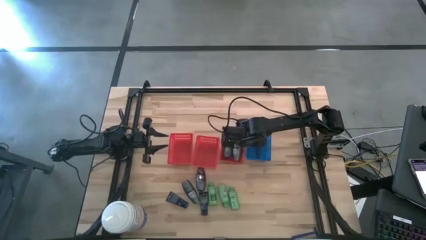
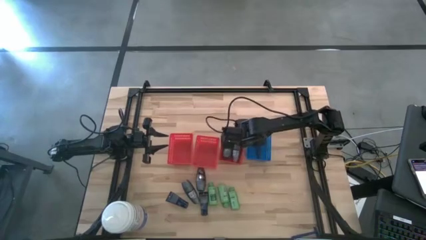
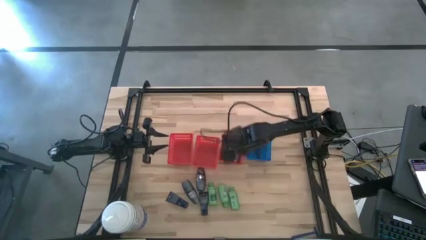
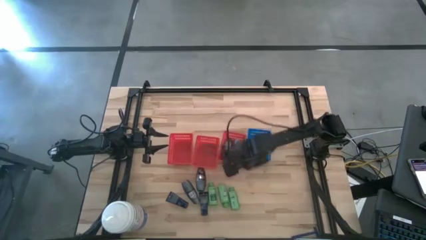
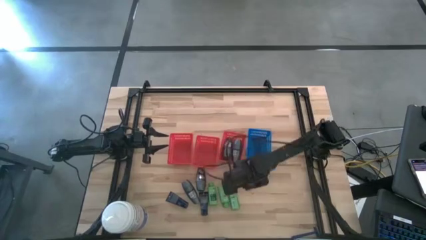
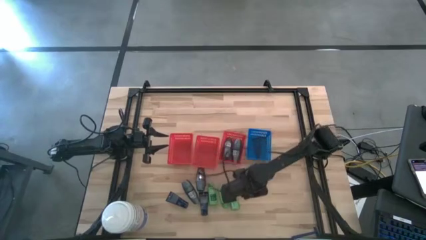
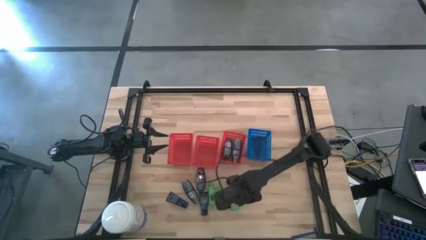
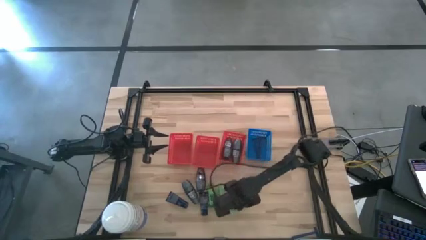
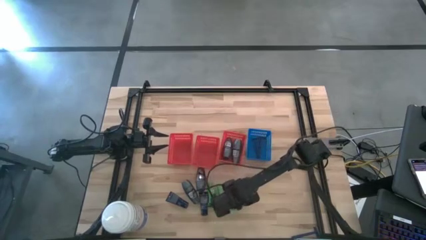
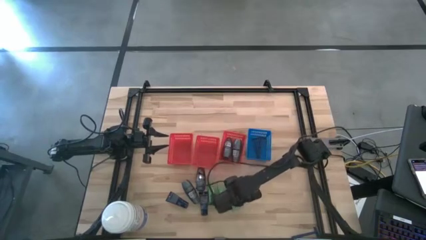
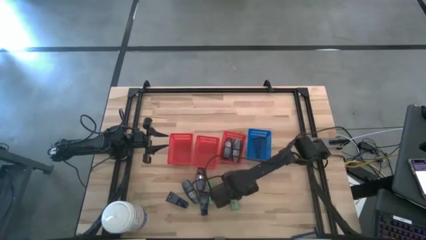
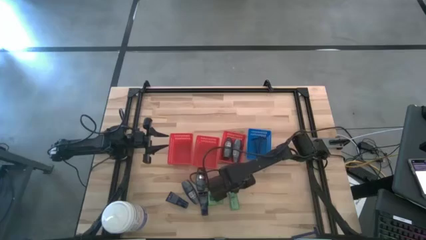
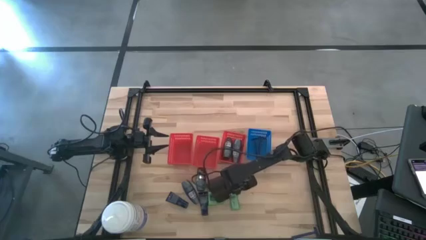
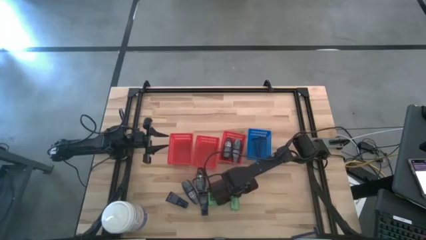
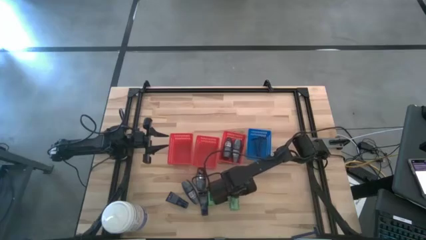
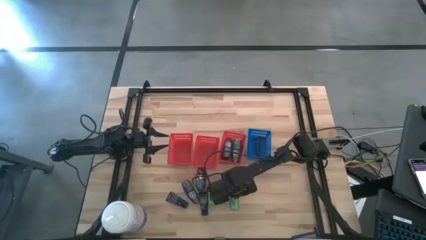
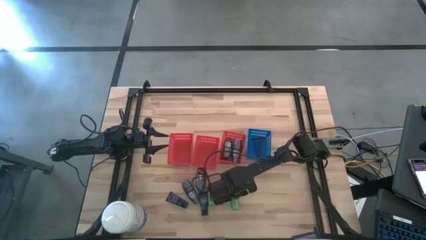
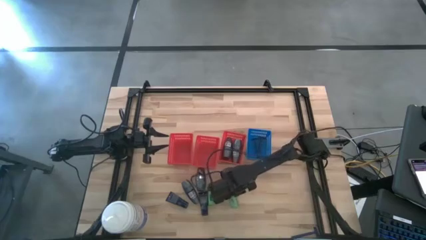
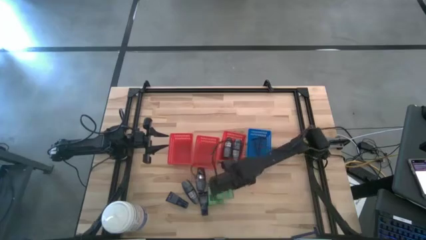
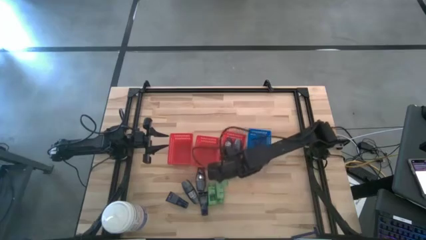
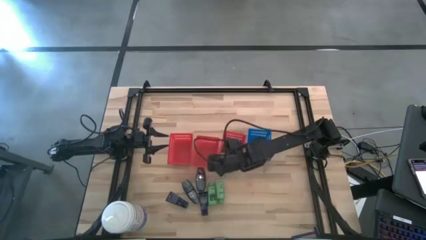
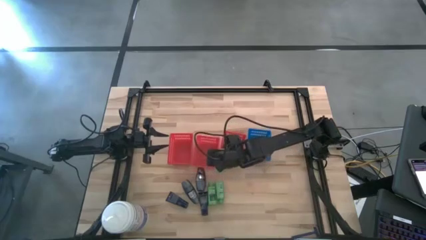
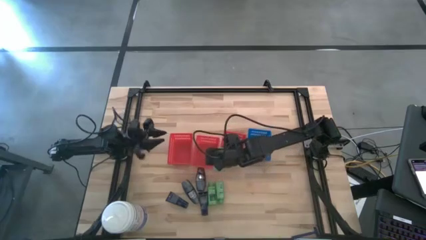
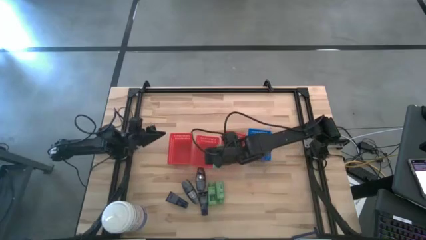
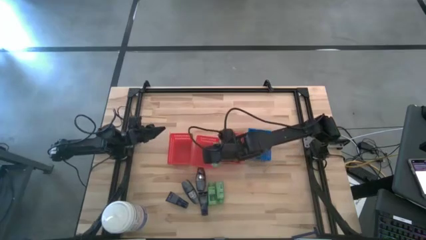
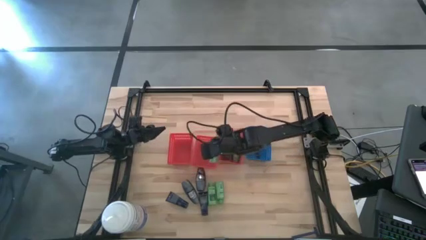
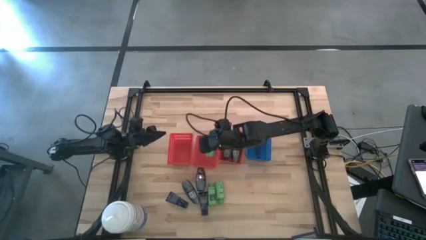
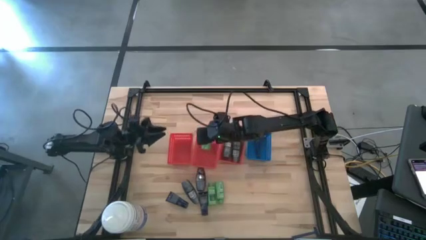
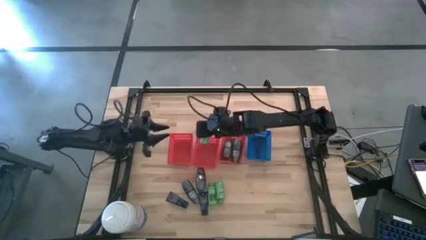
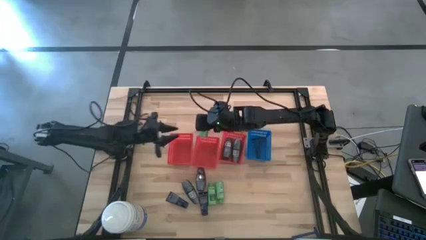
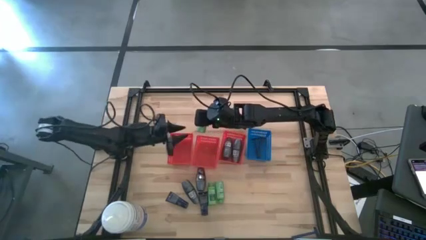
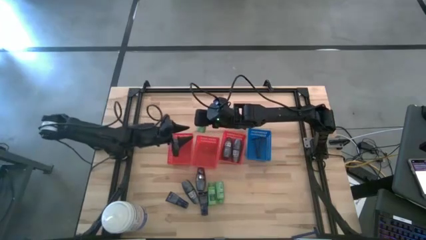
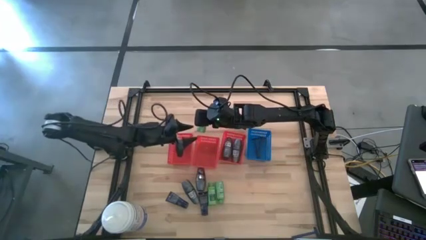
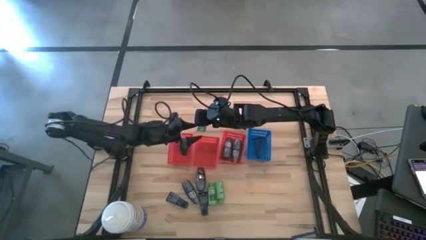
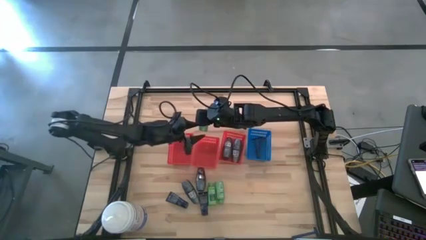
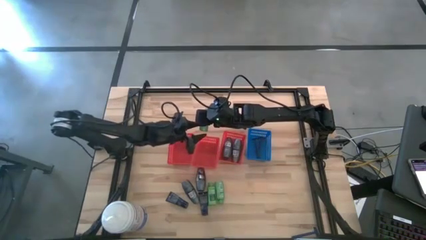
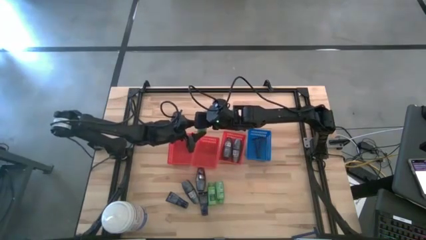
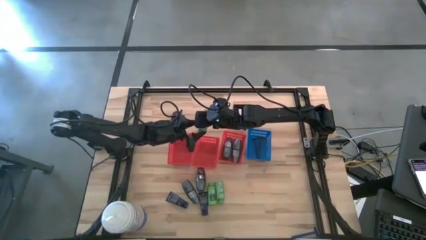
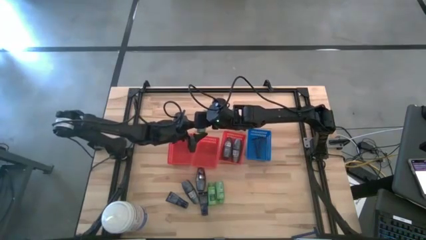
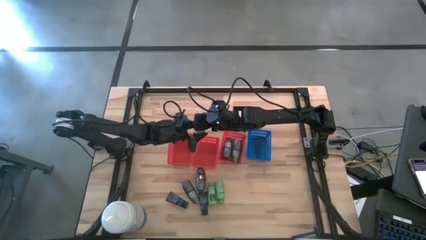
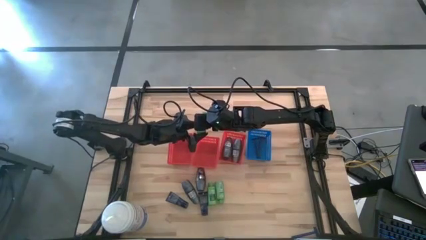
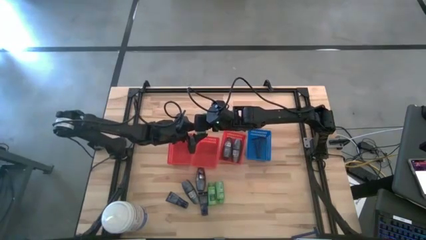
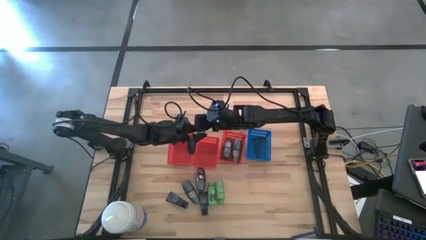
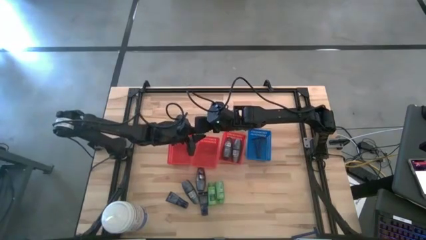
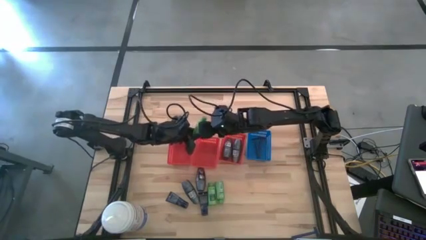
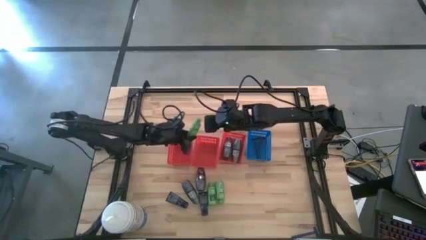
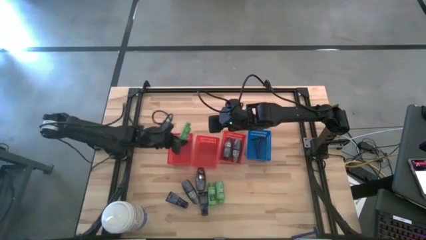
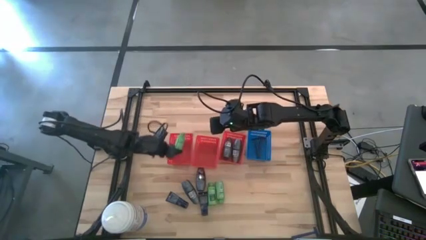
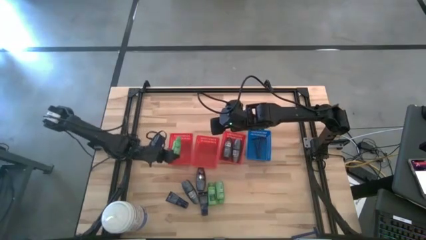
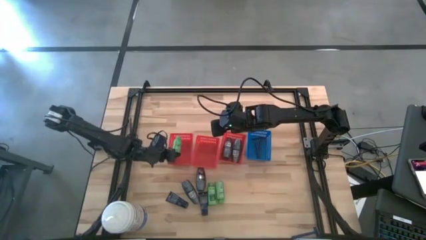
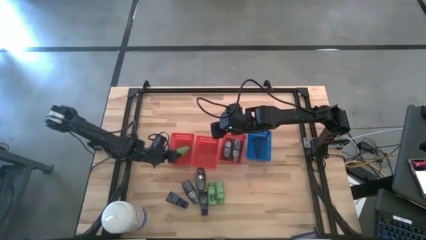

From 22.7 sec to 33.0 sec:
Task: Pick & Place Travel size toiletries
Put the shampoo into the left red bin

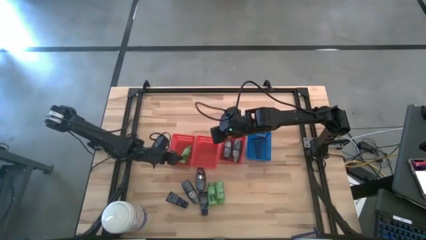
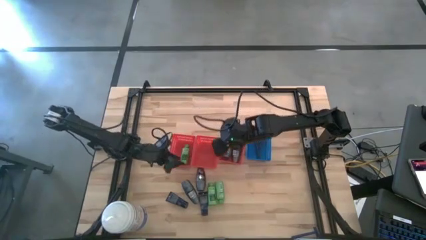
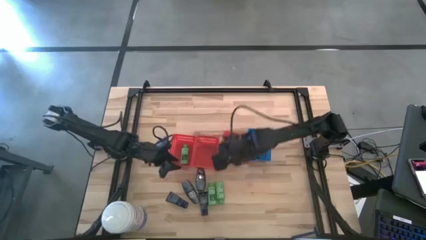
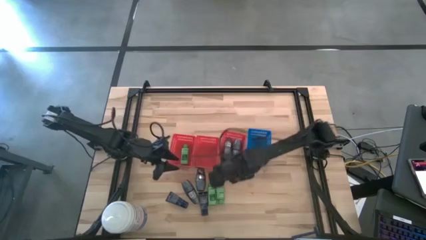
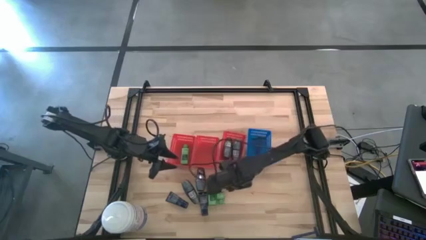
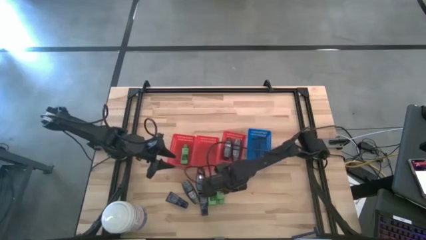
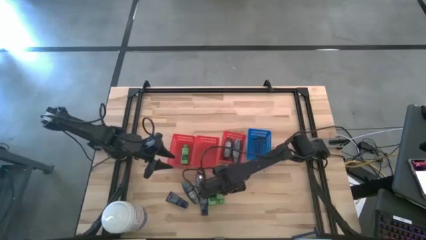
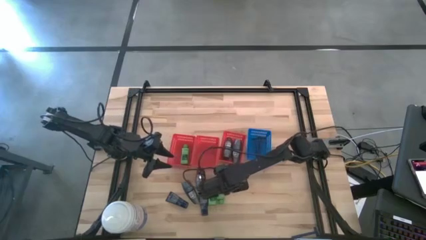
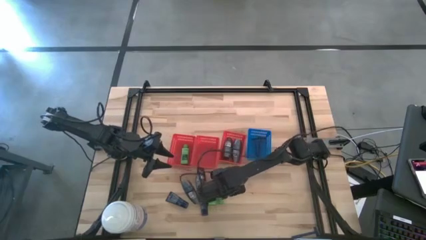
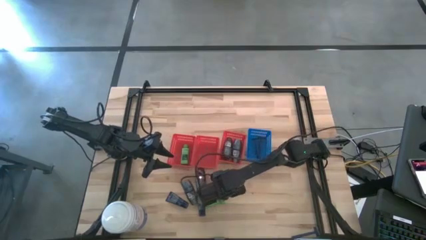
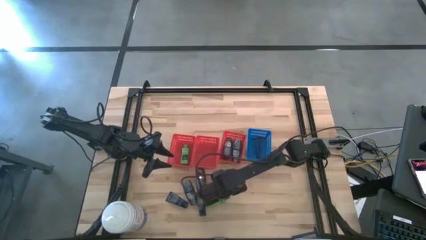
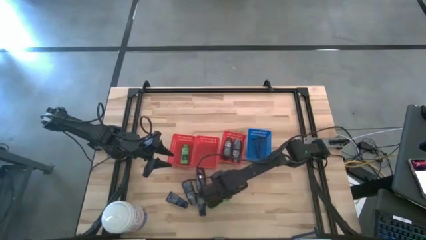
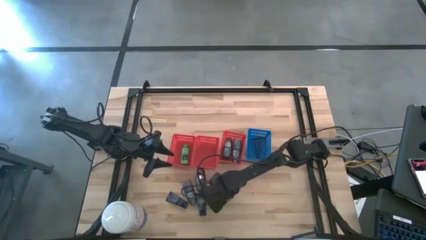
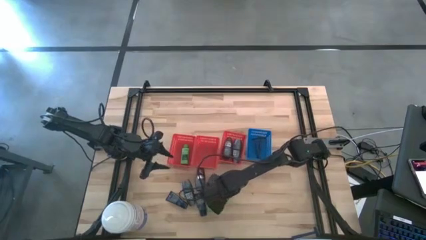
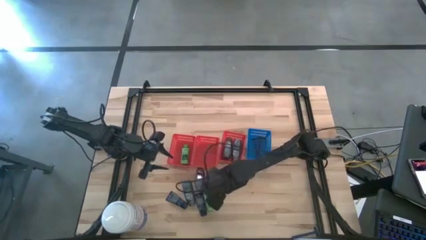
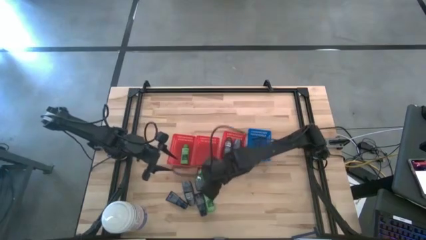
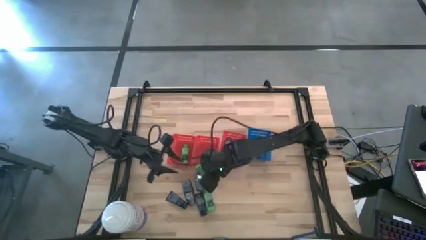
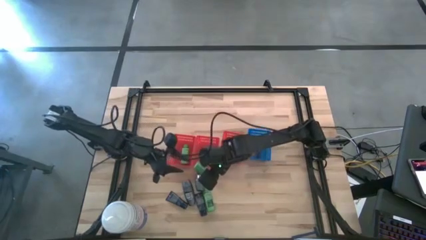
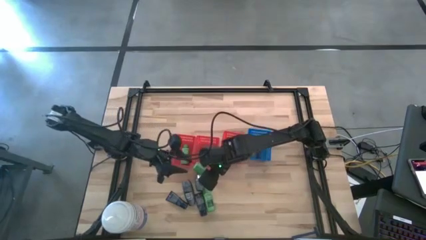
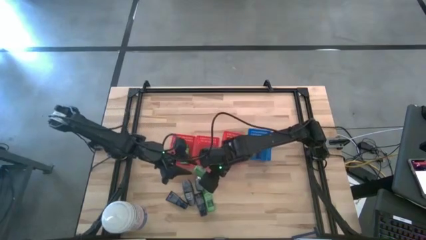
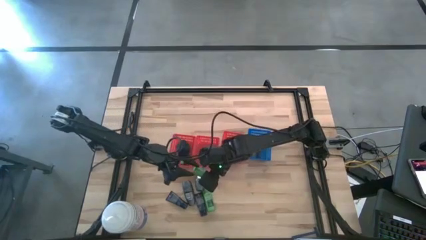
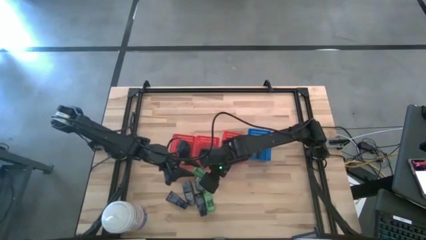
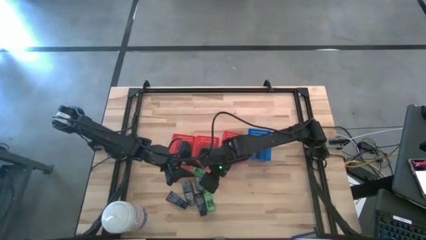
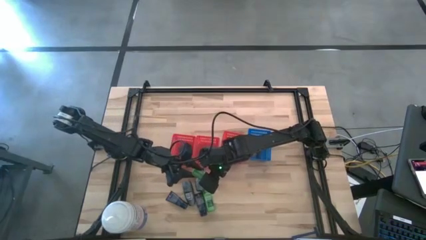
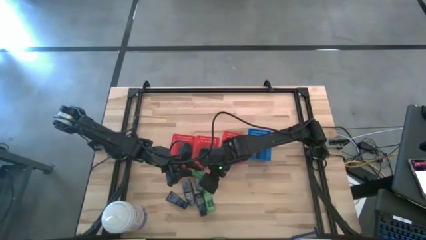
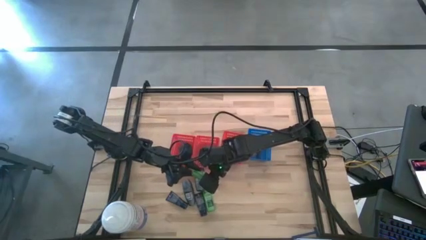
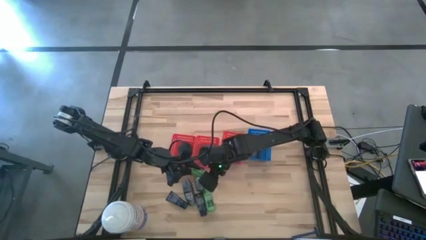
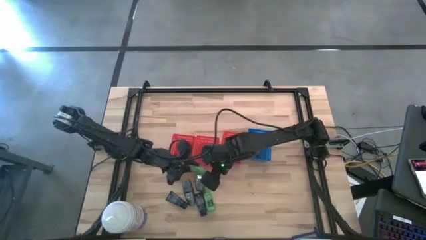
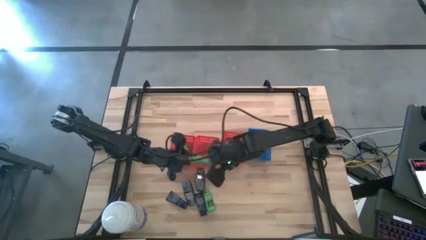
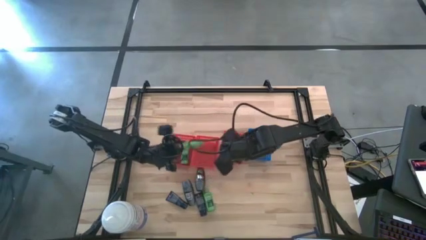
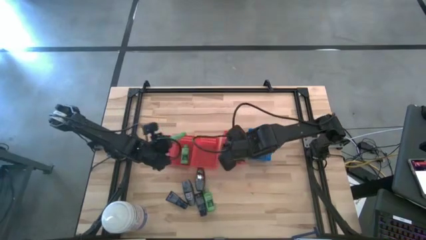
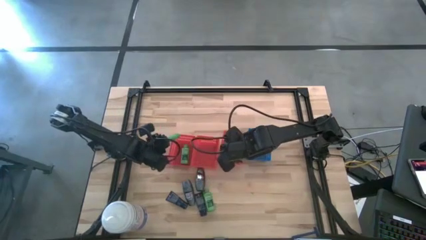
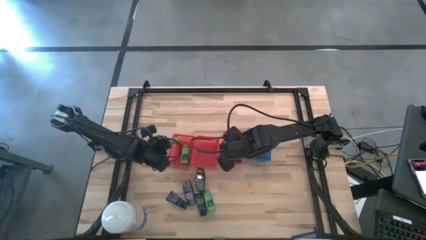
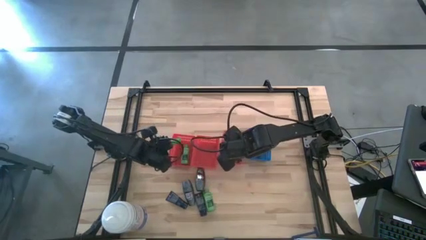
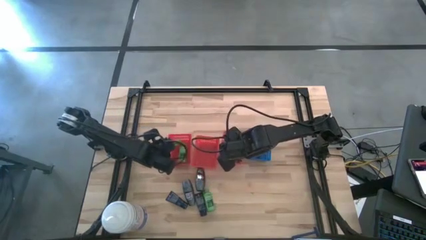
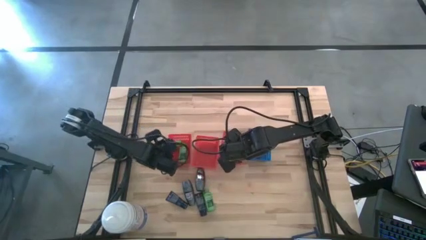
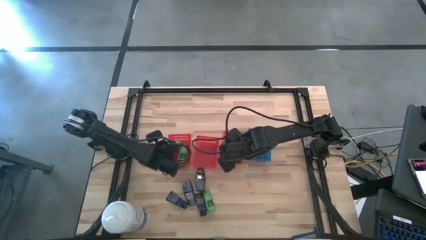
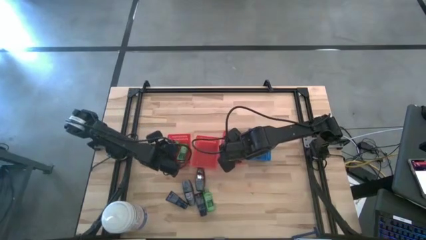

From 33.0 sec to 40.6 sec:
Put the shampoo into the left red bin
